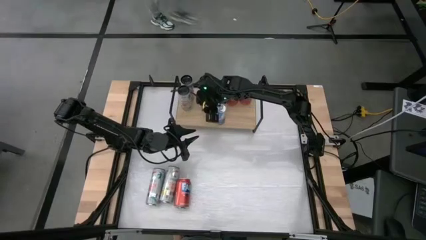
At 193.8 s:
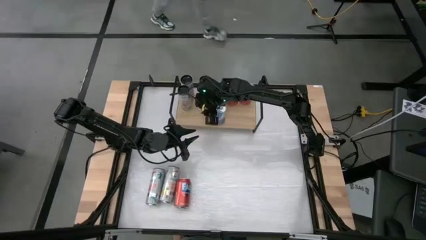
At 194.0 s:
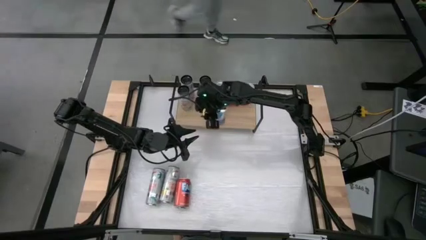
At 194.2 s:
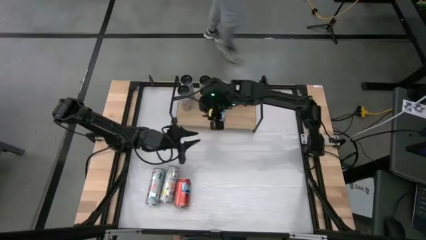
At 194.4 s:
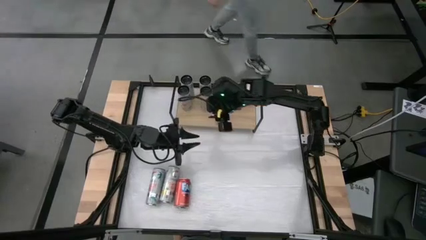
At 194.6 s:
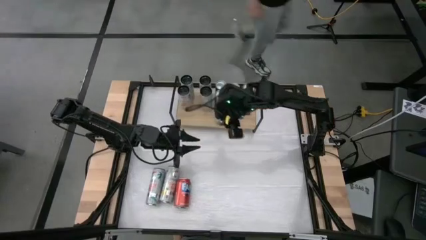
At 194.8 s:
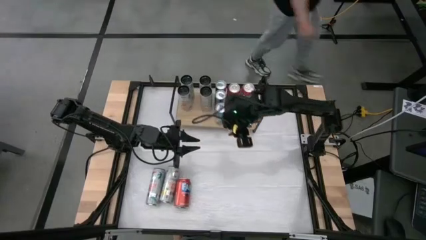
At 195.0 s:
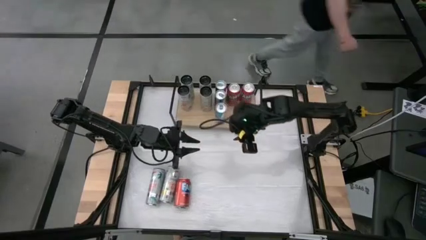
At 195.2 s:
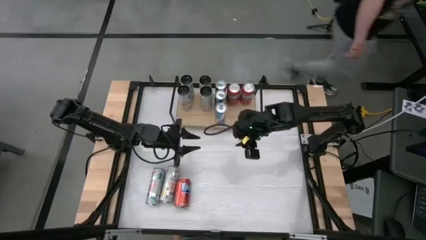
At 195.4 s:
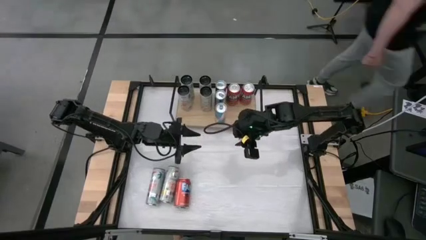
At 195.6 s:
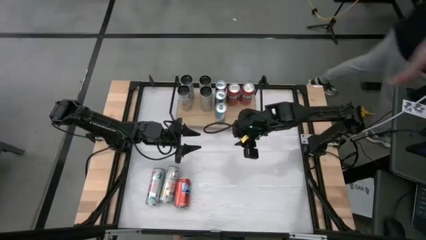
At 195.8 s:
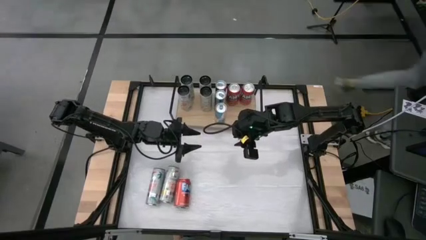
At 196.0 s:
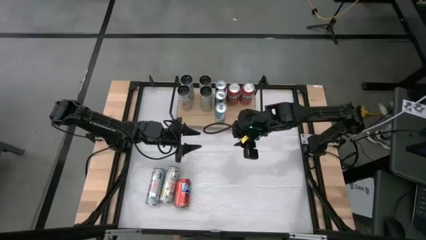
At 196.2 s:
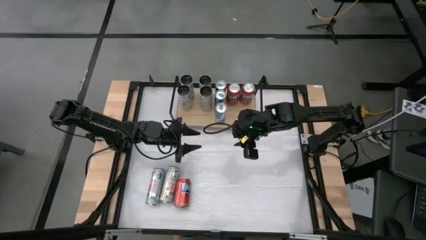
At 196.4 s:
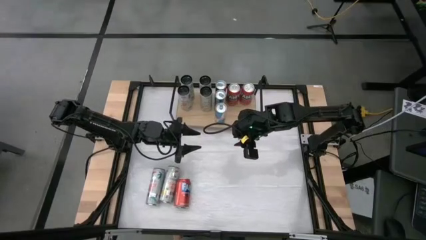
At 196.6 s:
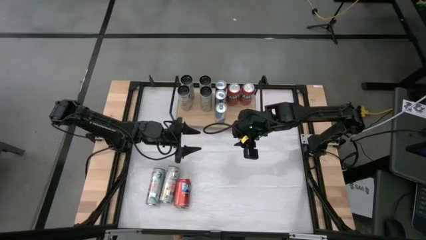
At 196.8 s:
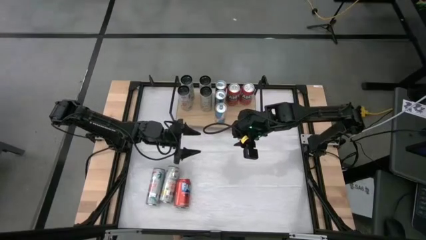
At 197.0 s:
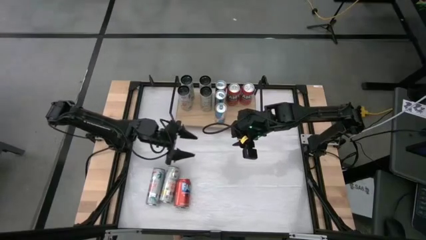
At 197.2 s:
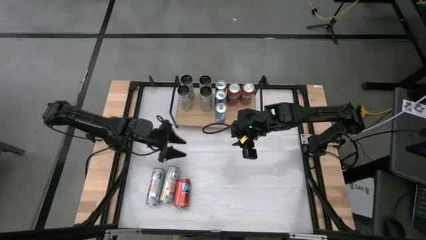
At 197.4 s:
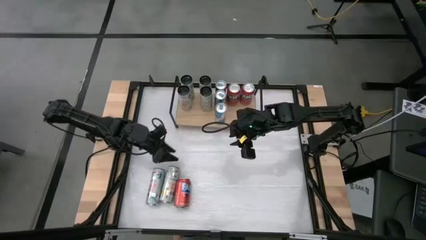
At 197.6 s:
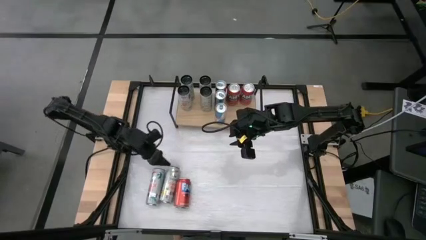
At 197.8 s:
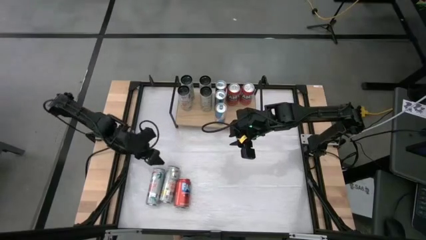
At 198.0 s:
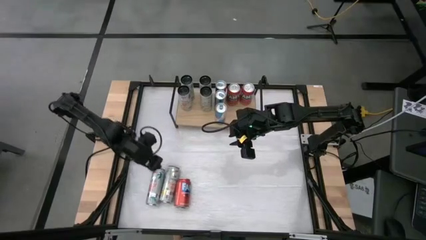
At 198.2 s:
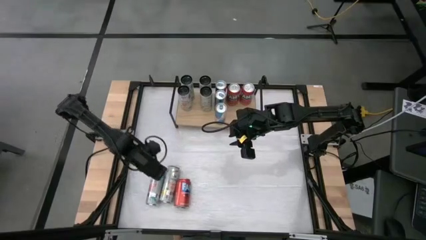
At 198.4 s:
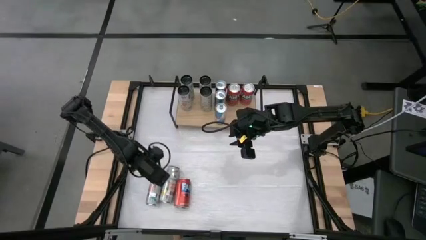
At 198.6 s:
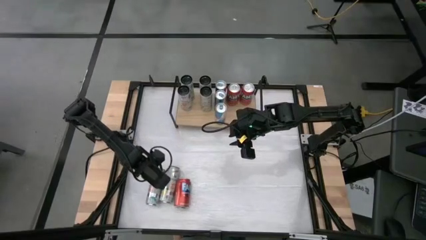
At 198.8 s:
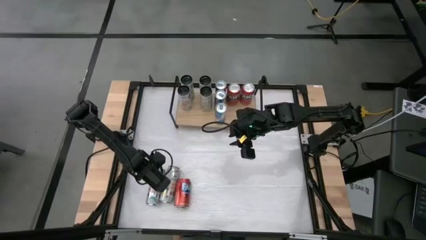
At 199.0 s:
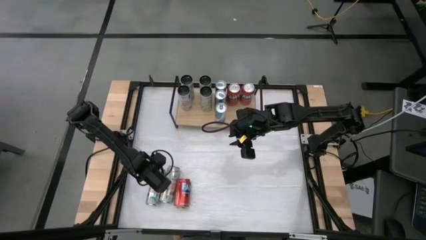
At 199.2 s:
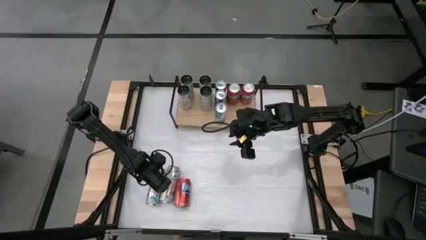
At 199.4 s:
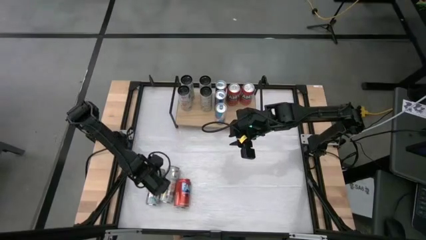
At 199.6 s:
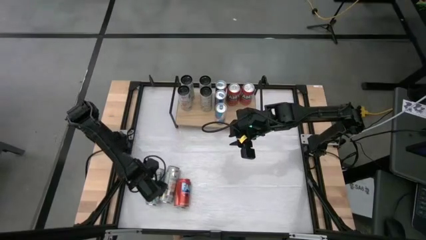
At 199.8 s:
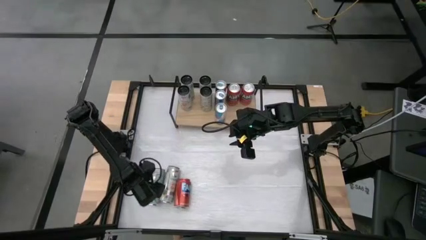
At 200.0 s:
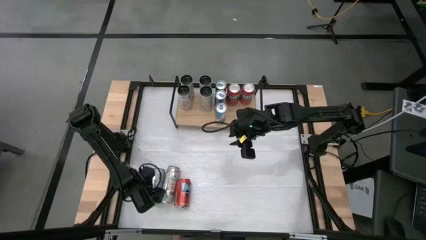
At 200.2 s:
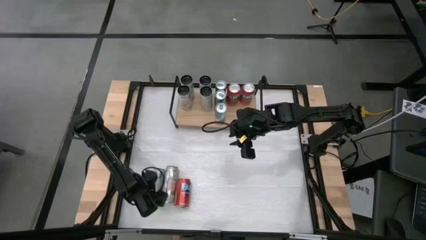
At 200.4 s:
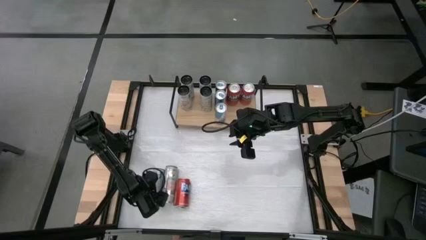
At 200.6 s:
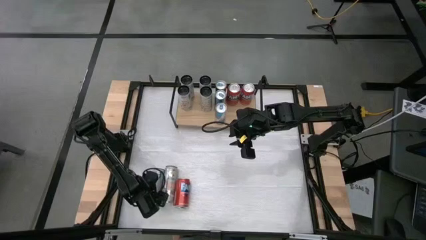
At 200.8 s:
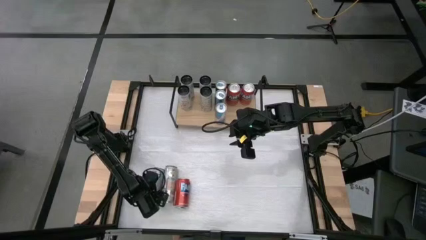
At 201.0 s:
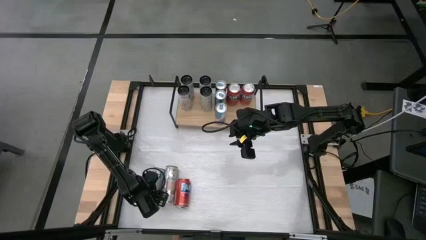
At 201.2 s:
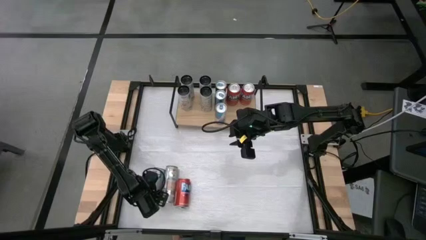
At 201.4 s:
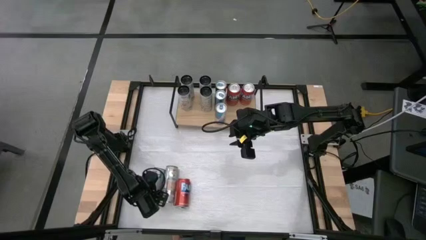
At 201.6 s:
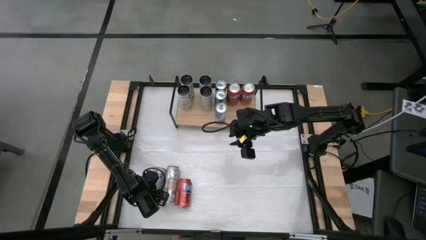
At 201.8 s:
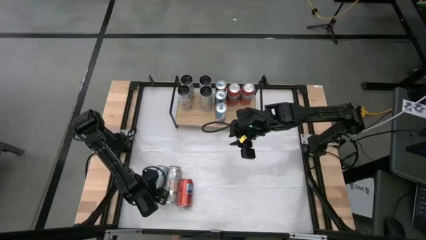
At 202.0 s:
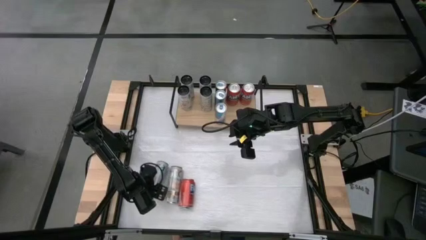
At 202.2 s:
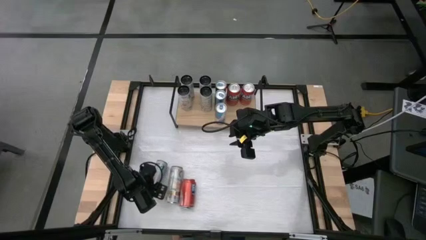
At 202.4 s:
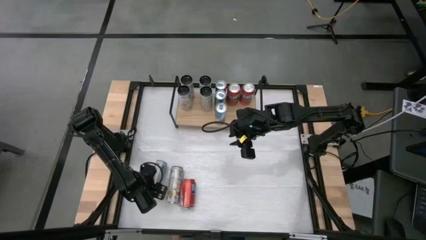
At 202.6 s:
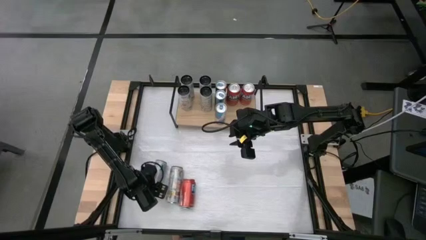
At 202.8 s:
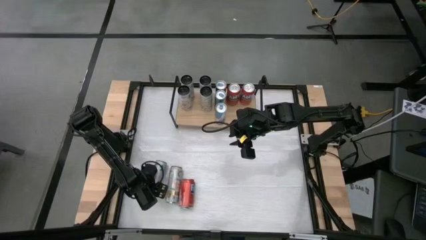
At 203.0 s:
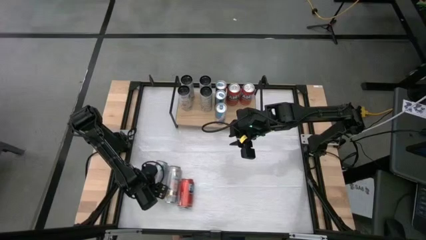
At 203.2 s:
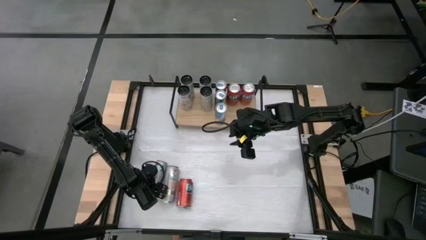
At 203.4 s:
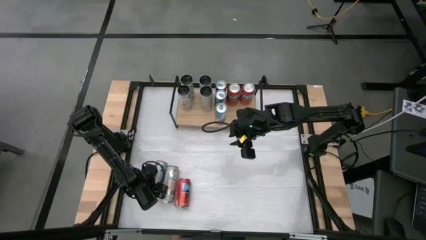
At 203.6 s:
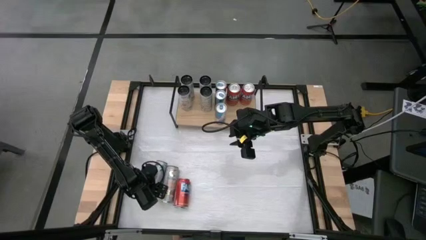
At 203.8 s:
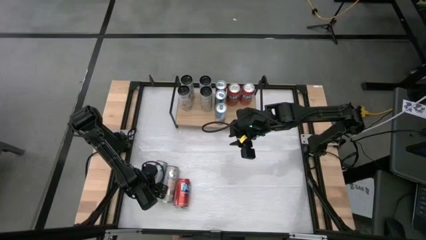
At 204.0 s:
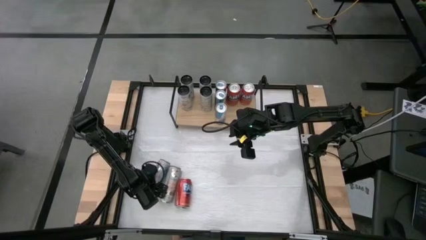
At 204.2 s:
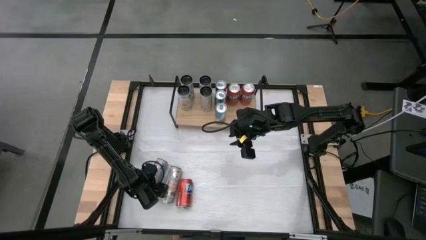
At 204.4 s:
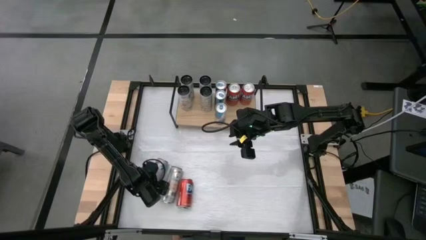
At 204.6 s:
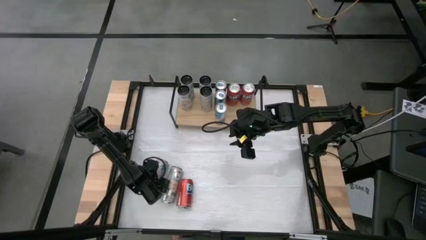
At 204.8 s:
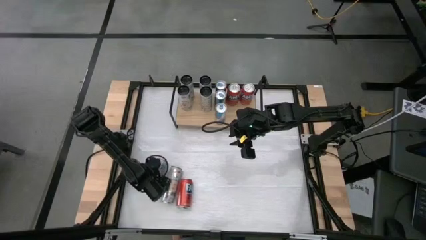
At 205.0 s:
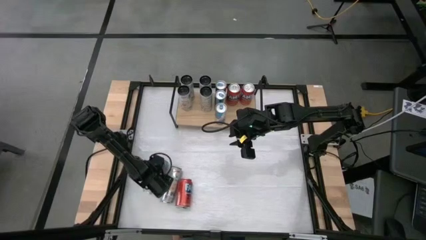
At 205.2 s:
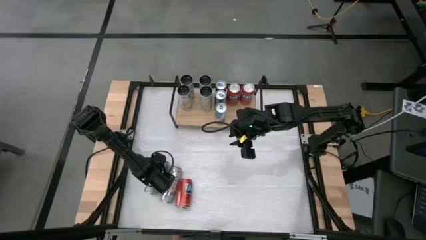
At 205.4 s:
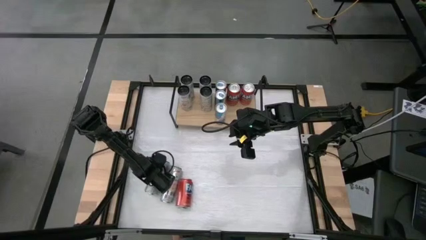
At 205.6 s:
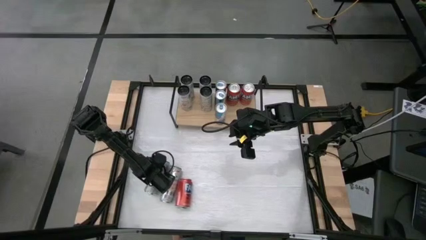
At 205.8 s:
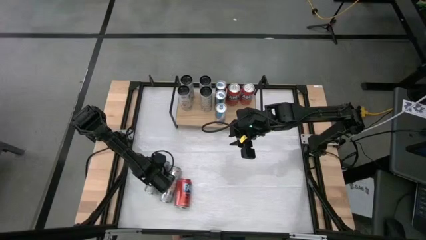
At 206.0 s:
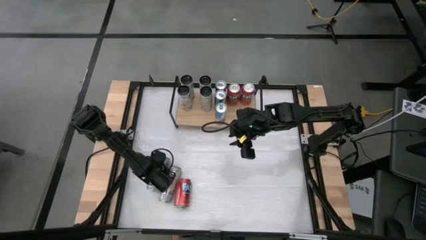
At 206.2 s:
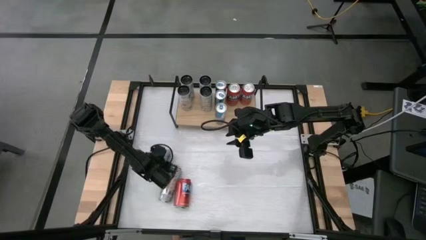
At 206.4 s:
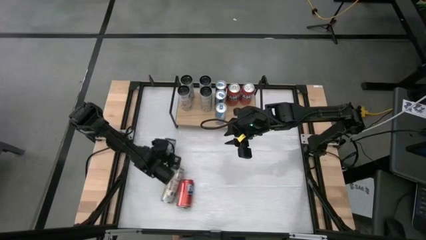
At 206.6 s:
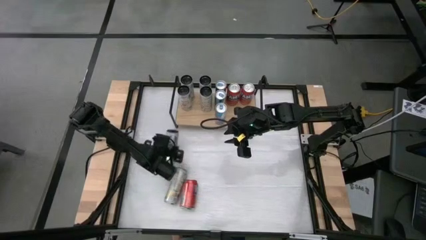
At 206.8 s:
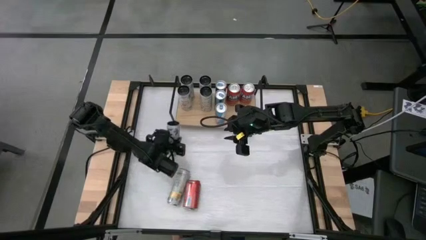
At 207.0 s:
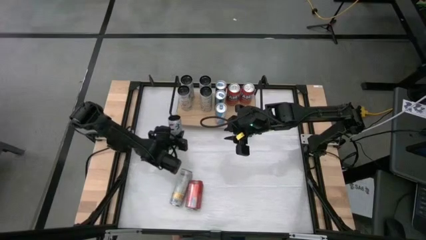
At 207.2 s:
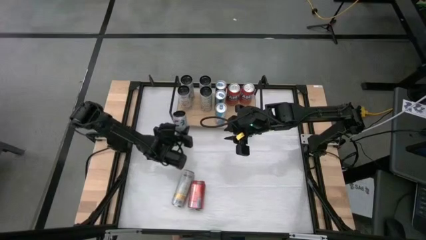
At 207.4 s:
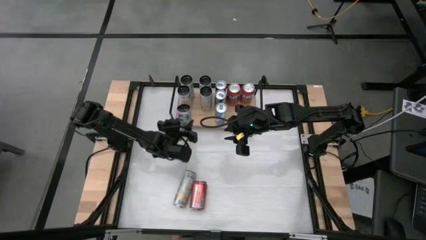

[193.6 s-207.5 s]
Task: Place canned beverage on shelf
Put the white pink soda can on the shelf aligned with the other white pink soda cans

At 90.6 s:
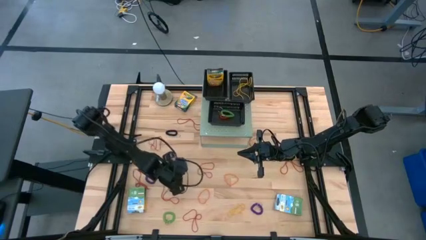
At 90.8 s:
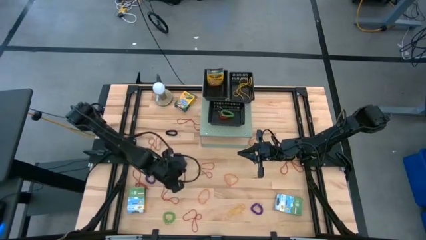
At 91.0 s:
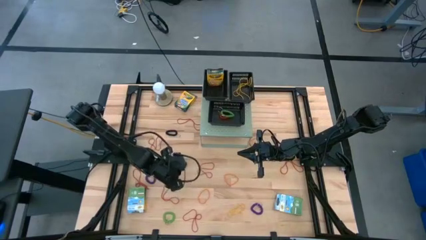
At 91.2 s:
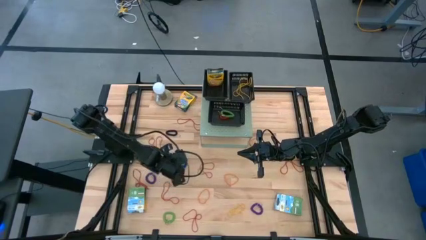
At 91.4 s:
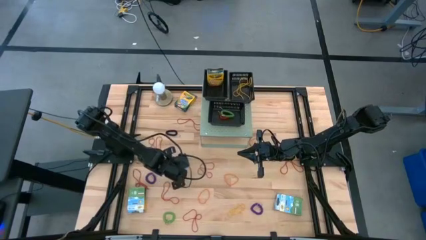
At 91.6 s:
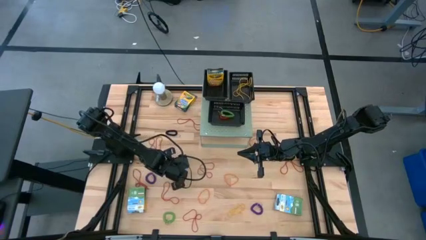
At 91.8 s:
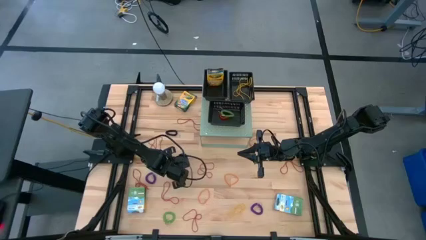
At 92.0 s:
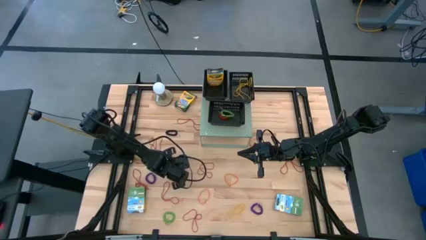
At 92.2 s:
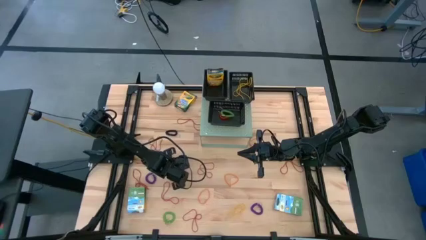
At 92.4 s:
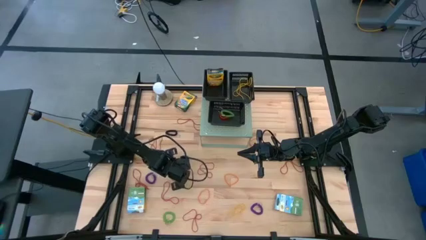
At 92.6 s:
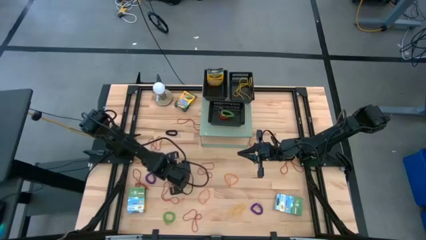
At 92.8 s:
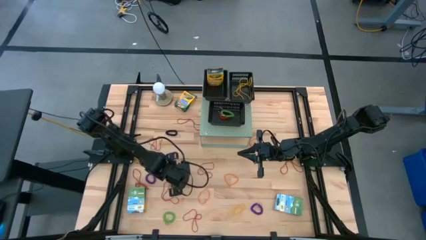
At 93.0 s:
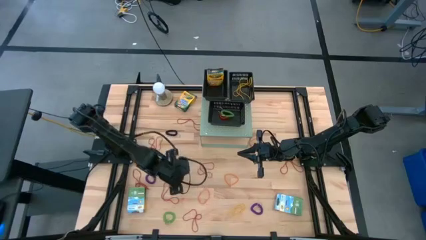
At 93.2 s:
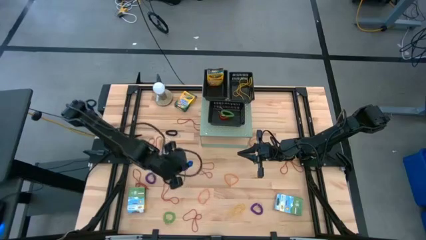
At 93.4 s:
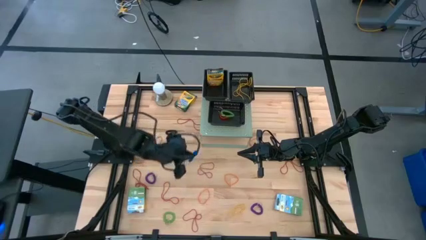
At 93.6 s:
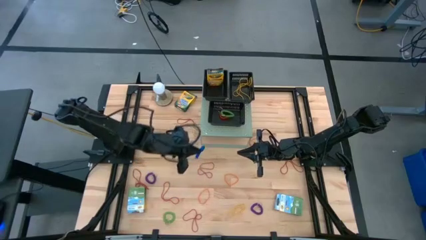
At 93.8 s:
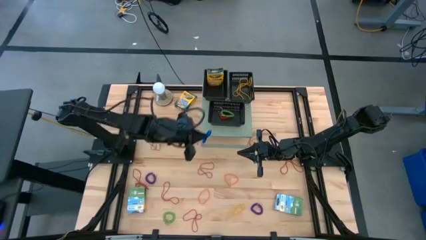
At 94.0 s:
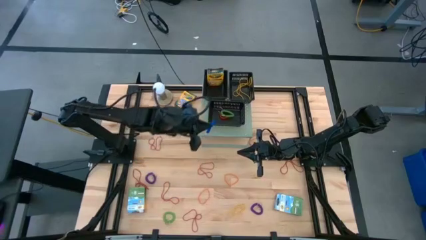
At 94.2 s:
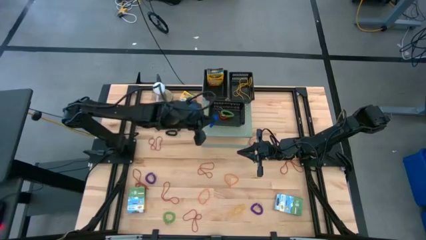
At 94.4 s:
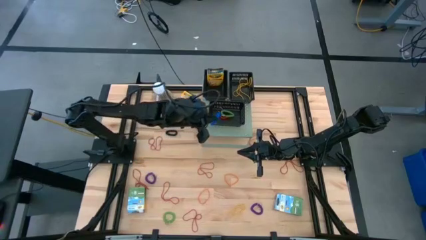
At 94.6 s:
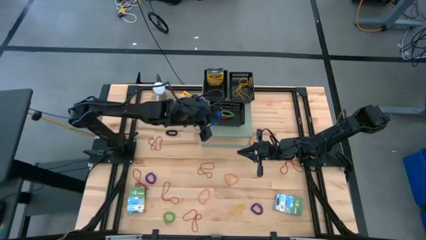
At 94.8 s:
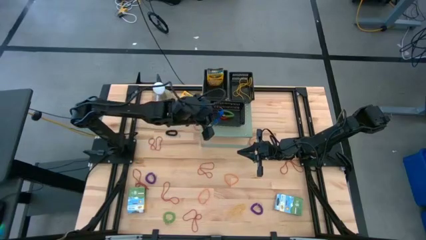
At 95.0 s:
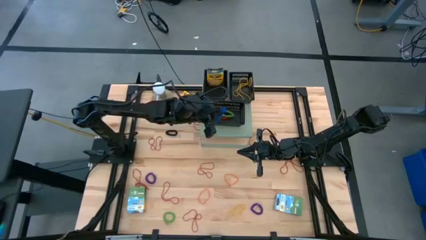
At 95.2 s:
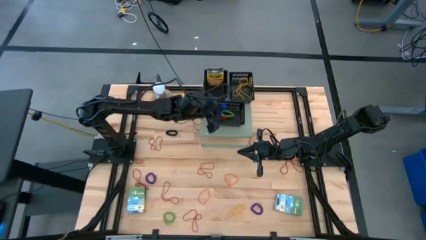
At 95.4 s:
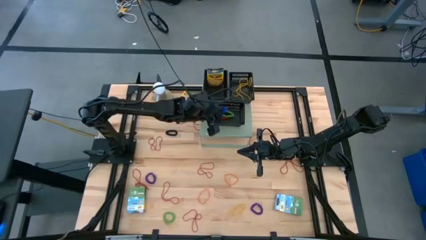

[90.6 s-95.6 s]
Task: Pick & Place Office Desk Supplies
Put the blue spring keychain into the bottom black bin on the shelf
